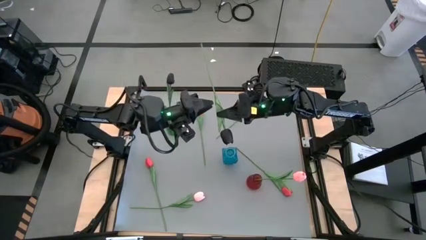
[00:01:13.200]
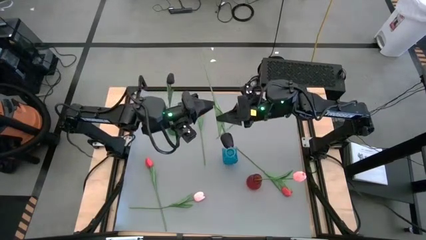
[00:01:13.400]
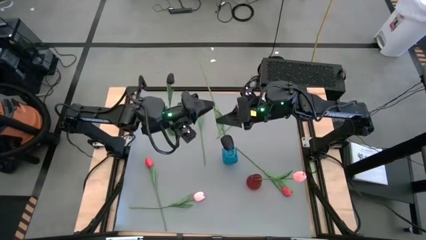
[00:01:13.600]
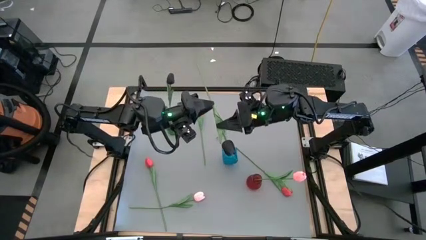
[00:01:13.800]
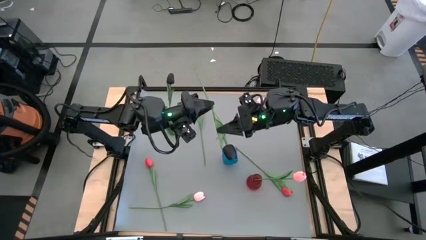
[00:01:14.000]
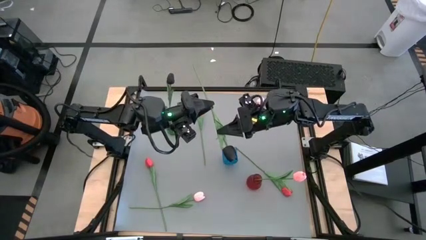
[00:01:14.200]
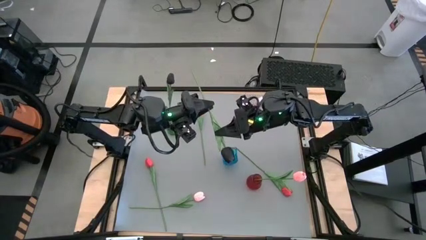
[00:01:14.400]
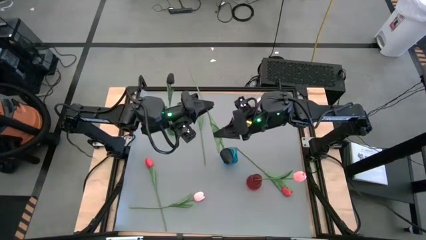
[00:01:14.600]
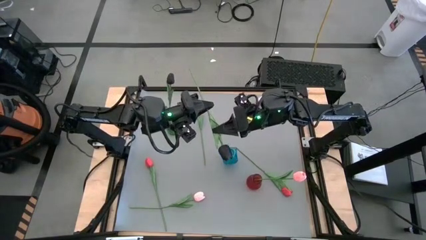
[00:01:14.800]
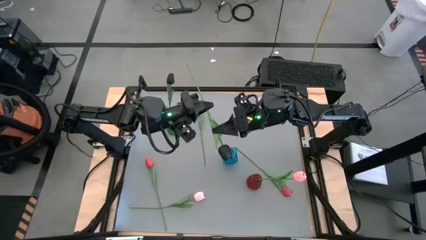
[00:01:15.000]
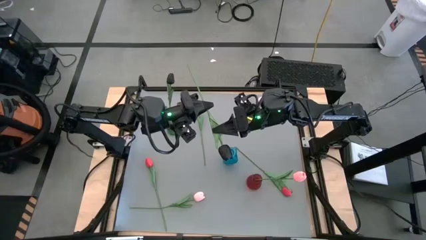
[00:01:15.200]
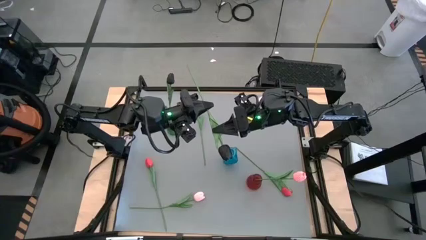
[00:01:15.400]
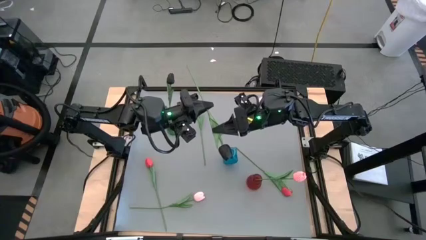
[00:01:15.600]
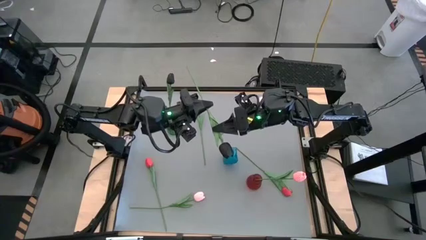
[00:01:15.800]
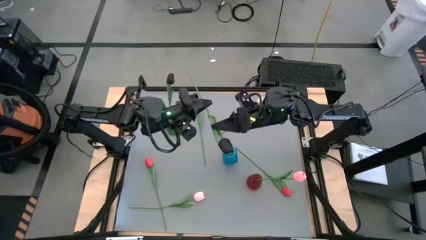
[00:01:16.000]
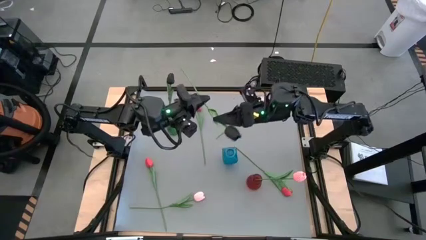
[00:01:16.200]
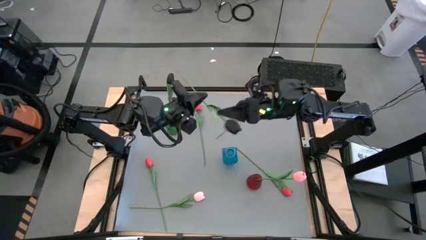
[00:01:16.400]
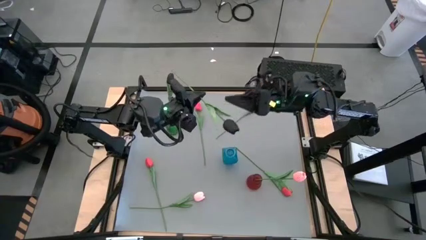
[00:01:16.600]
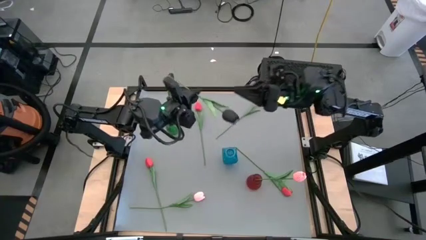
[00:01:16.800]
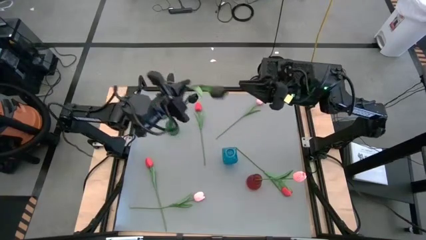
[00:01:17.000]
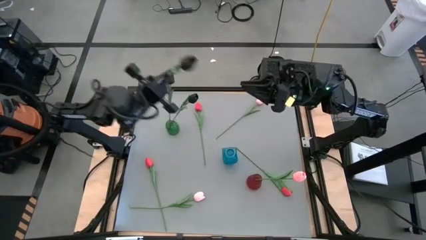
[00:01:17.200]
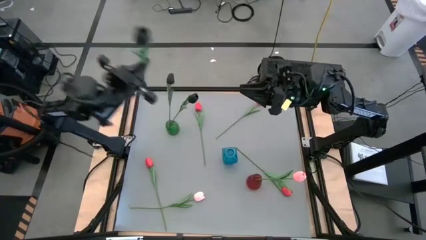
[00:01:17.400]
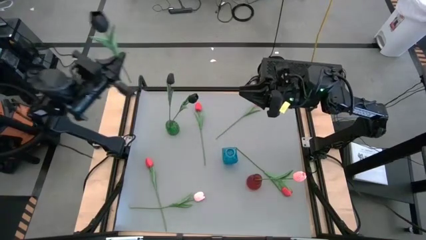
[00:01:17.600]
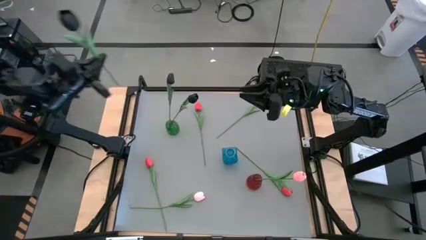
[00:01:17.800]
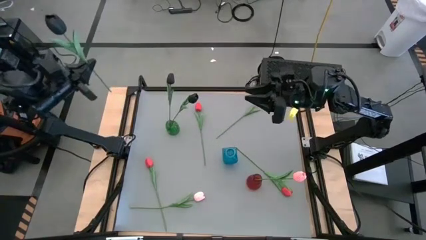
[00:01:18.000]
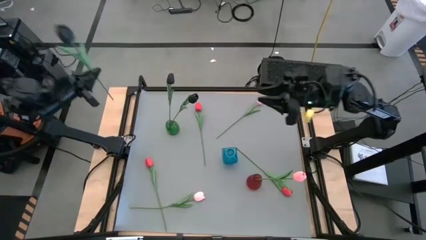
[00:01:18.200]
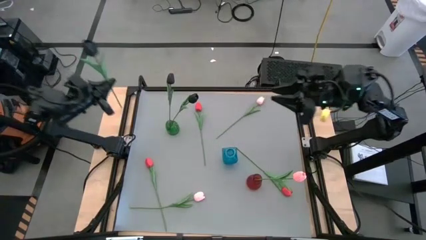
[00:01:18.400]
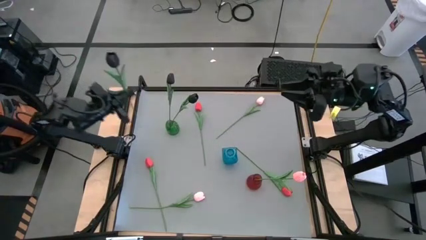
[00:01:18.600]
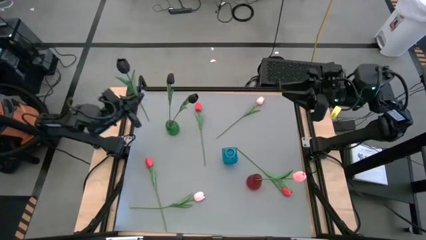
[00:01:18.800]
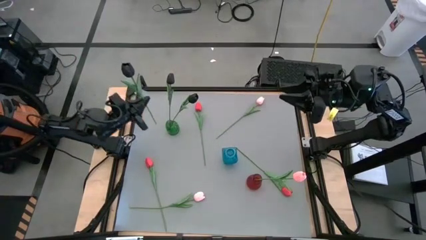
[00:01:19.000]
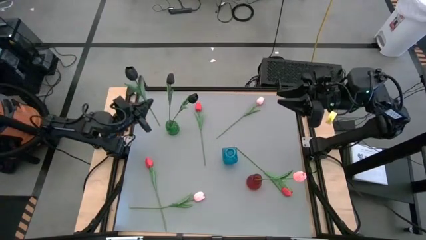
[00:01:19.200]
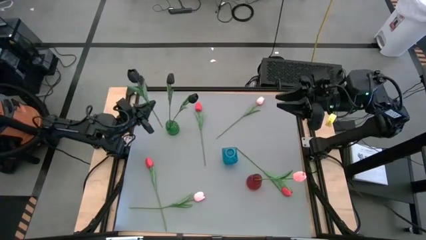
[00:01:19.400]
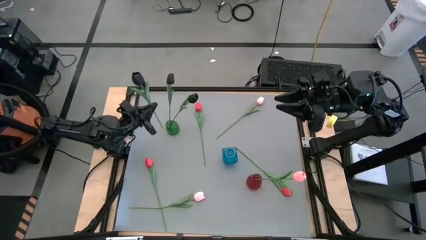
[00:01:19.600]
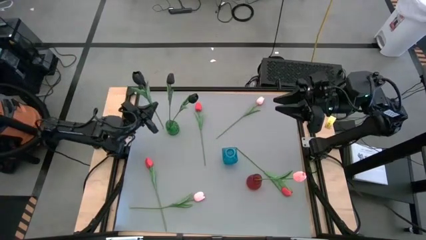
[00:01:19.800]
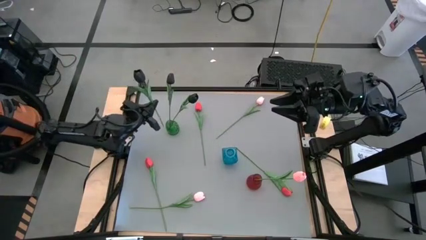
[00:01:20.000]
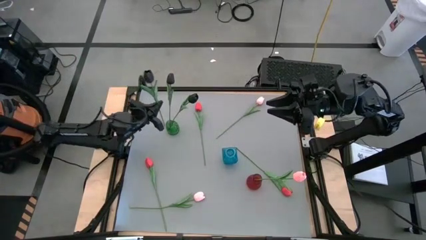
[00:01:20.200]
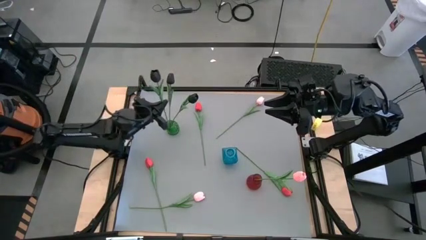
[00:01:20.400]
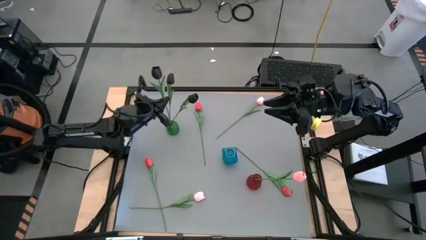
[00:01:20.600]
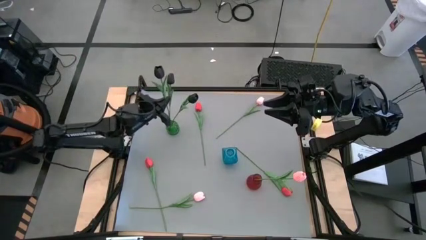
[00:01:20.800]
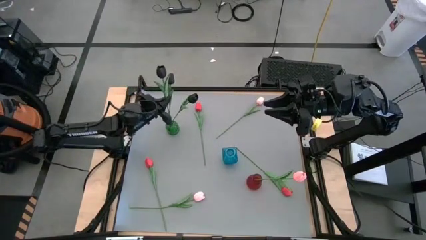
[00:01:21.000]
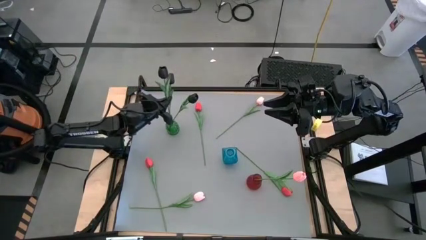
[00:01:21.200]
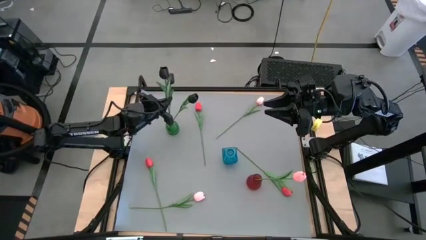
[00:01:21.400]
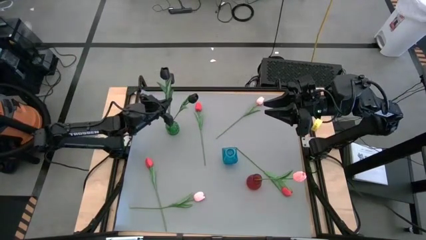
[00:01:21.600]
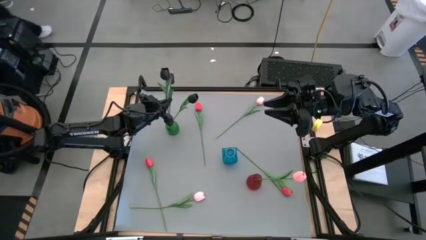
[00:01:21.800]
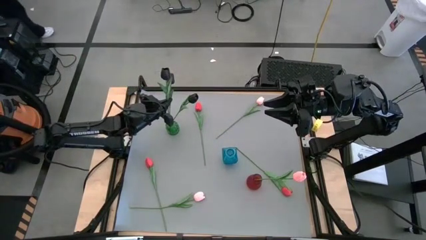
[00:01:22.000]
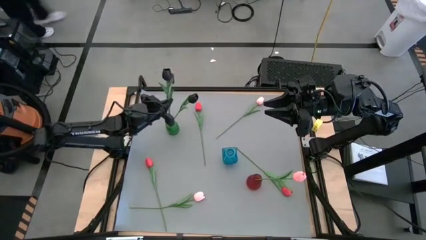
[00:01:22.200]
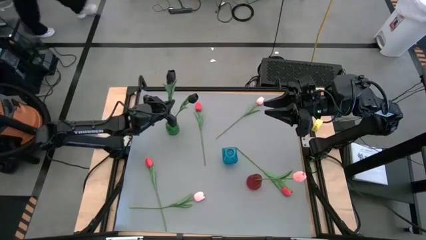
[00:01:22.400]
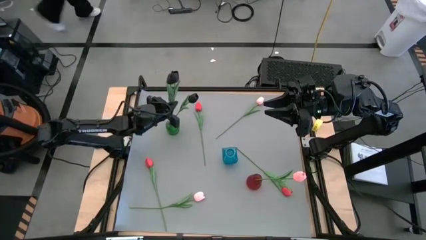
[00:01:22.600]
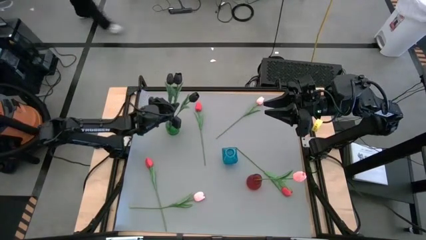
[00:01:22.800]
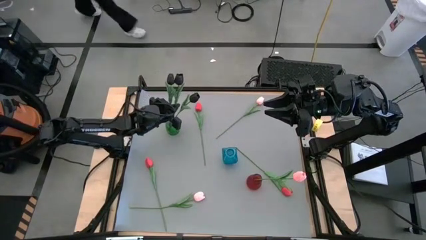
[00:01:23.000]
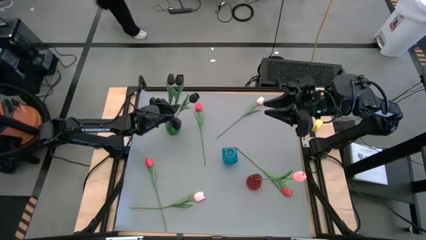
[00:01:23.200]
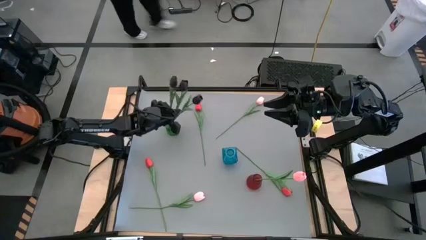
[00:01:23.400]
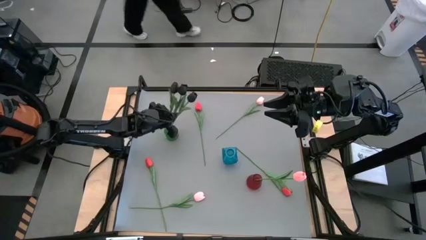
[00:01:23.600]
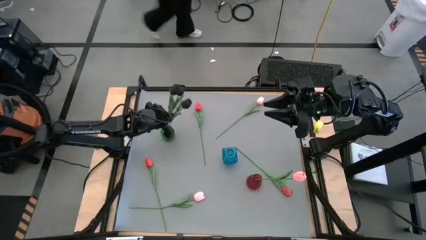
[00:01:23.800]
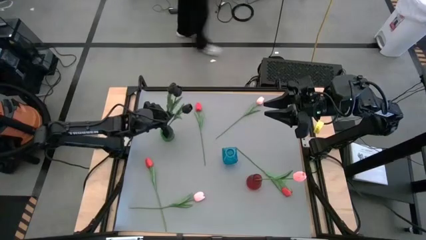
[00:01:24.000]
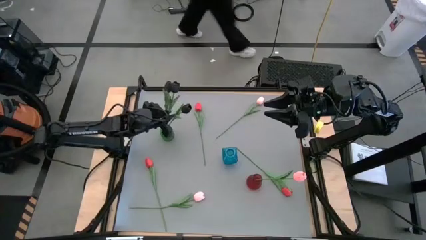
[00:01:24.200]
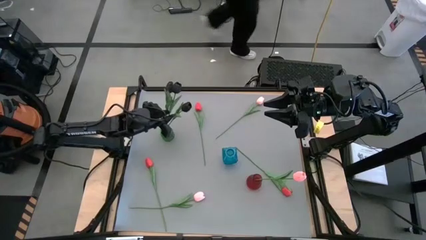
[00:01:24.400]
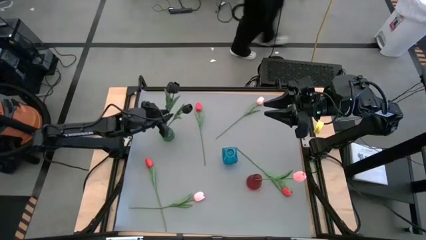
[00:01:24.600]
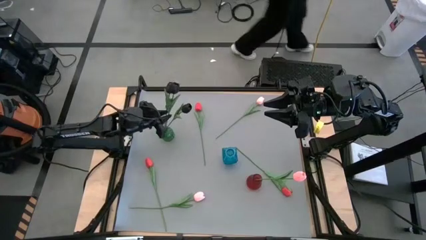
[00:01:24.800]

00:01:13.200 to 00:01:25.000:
Task: Sort flowers into vase by color
Put the black tulip into the green vase
